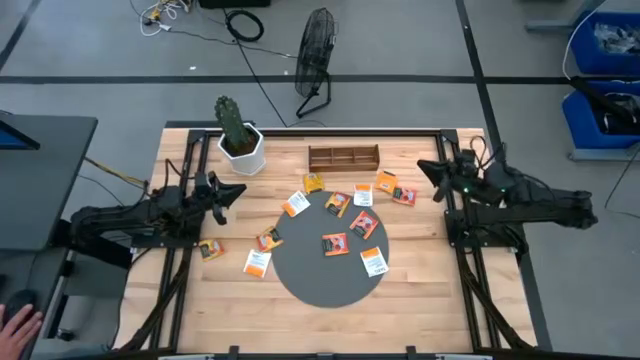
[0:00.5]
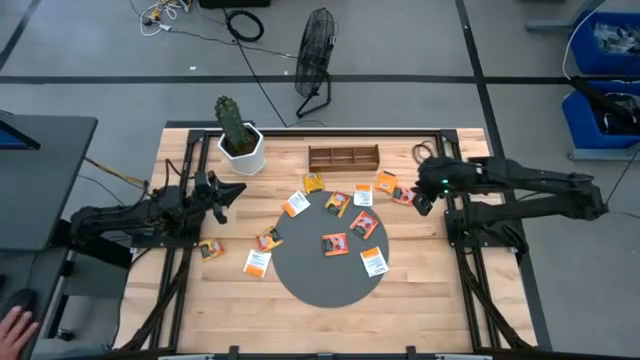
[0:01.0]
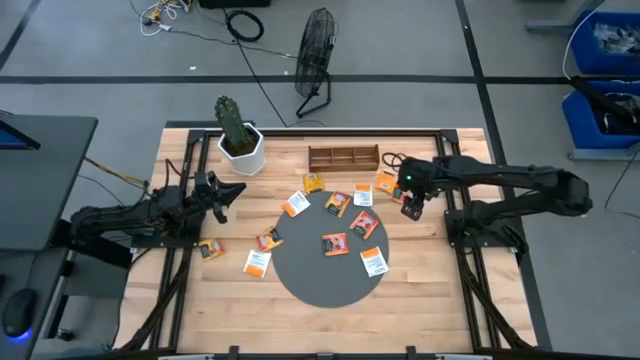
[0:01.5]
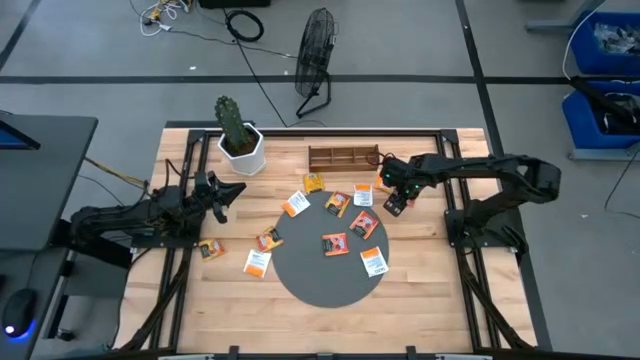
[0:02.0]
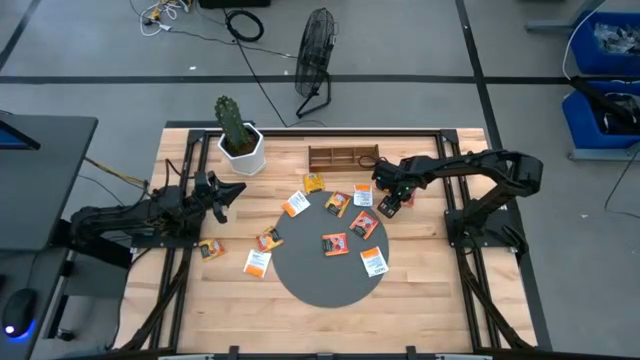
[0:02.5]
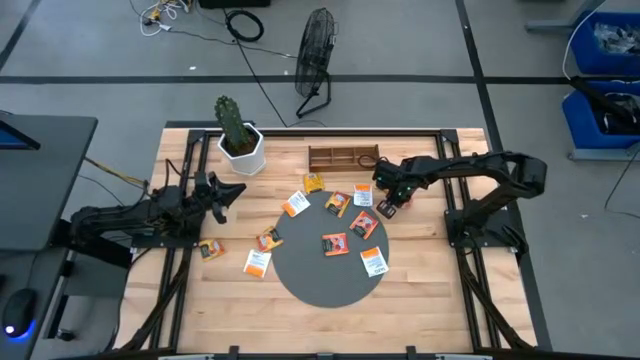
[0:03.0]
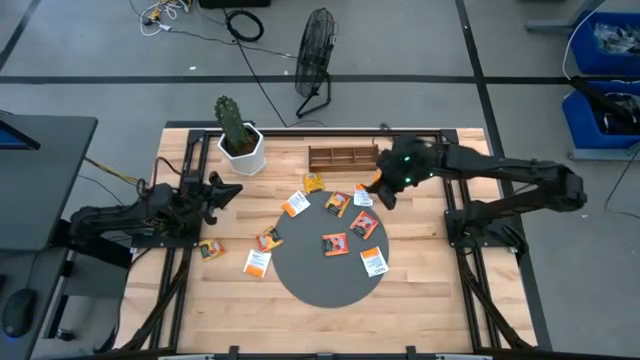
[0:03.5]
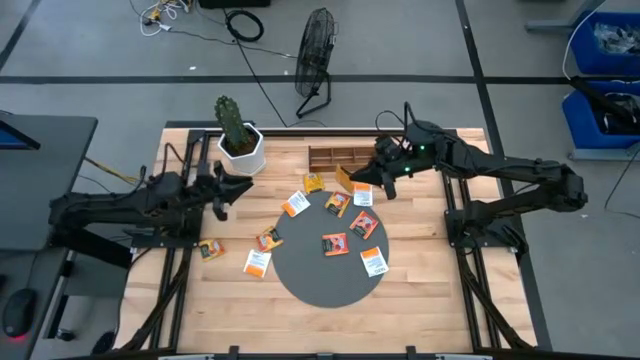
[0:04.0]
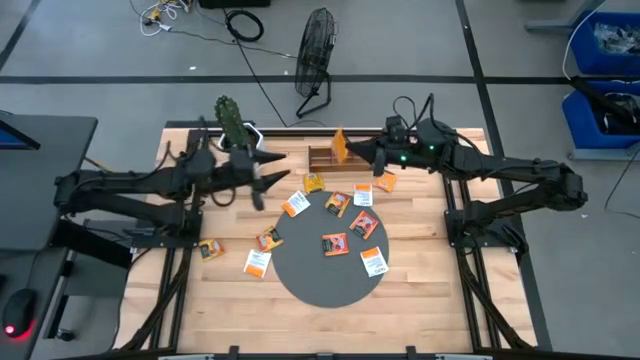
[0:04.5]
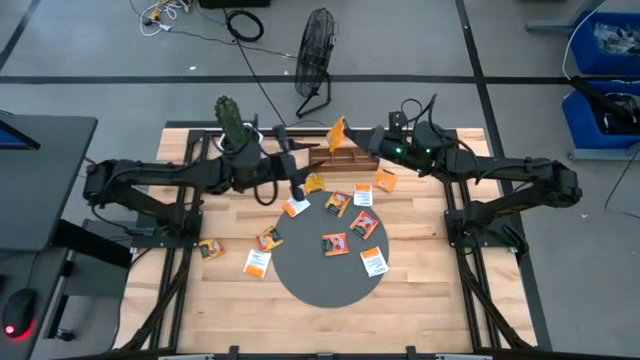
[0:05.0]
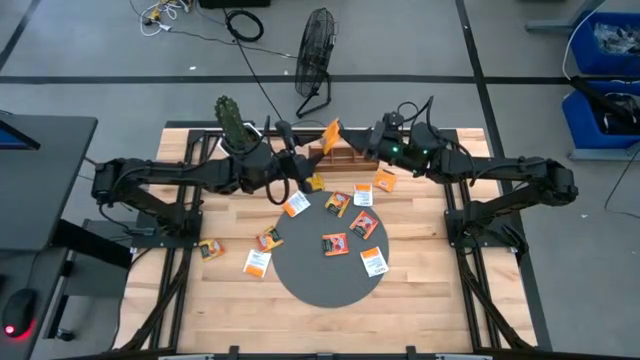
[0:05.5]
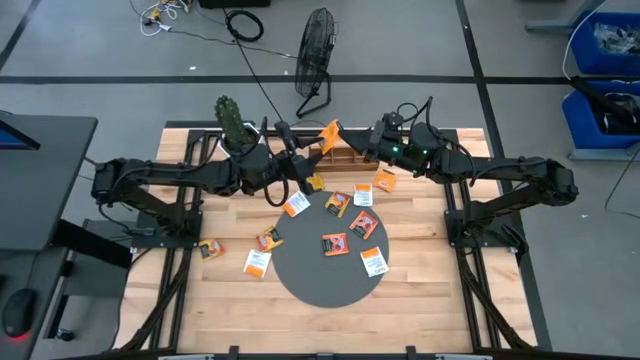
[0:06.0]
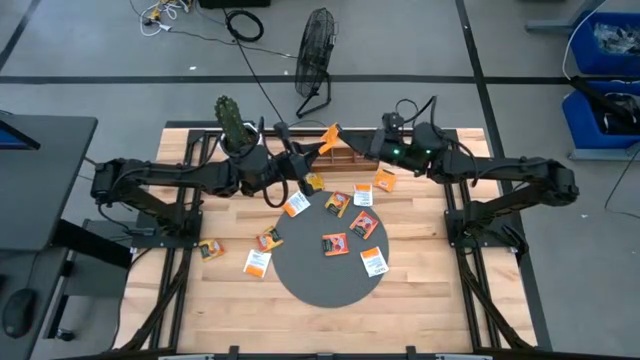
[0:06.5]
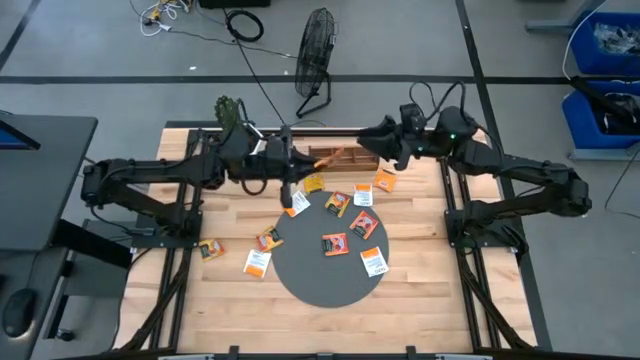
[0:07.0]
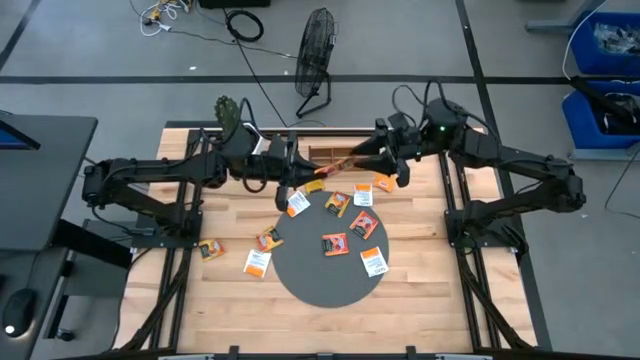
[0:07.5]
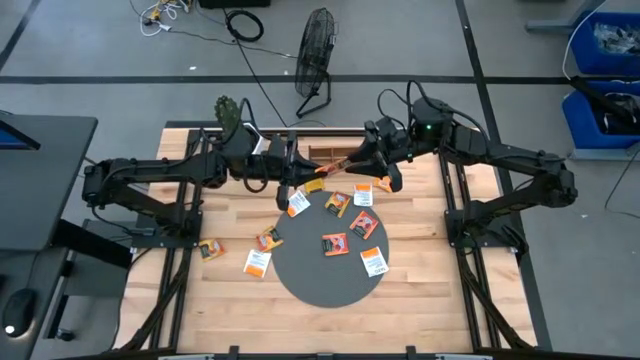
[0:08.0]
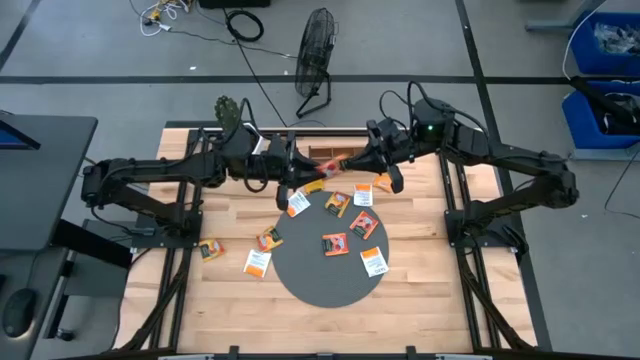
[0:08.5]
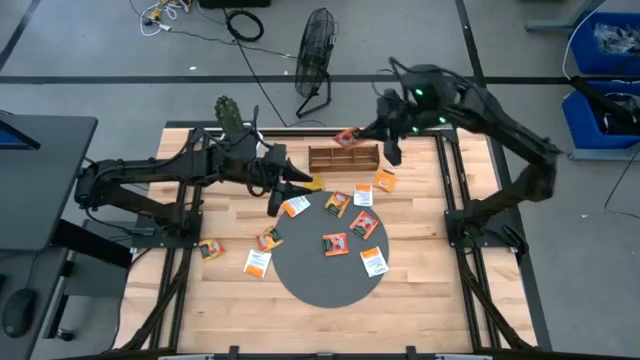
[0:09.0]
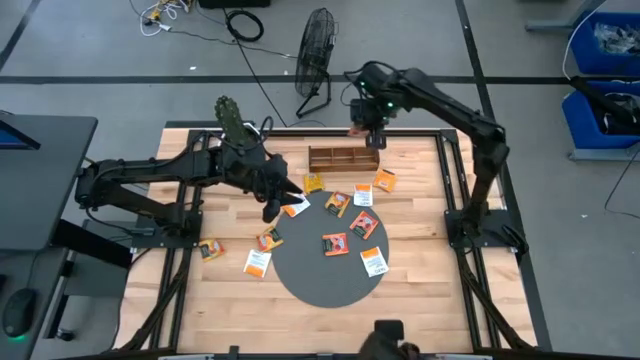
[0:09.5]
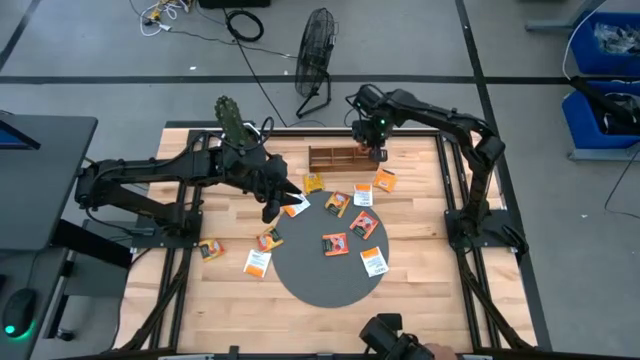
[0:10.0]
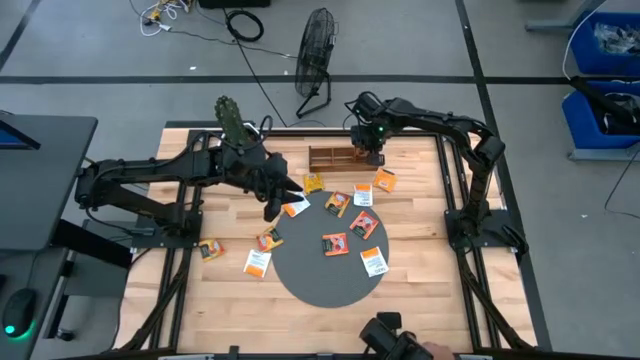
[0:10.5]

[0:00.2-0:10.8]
Task: Pick & Place Tea
Put the yellow tea bag into the right section of the wooden organizer

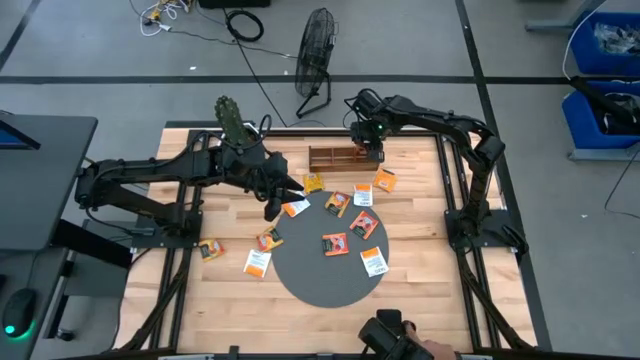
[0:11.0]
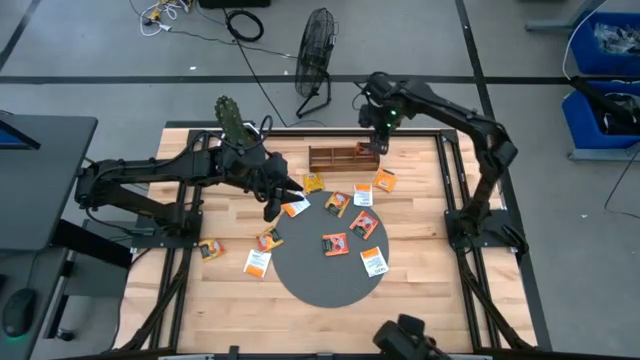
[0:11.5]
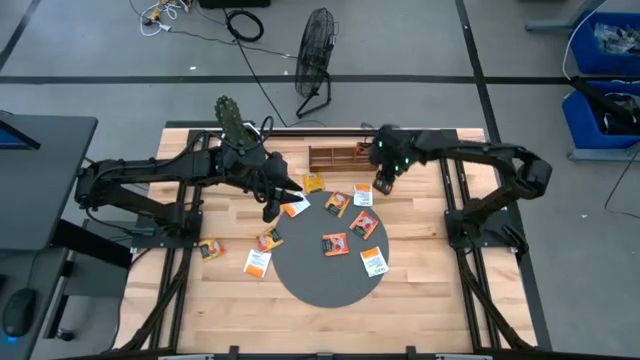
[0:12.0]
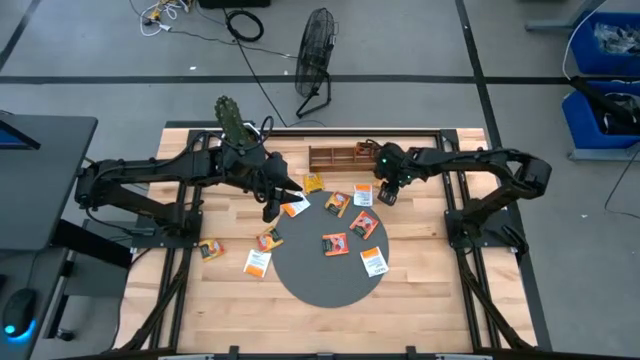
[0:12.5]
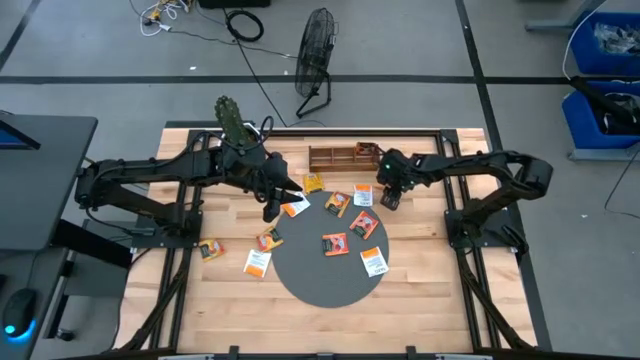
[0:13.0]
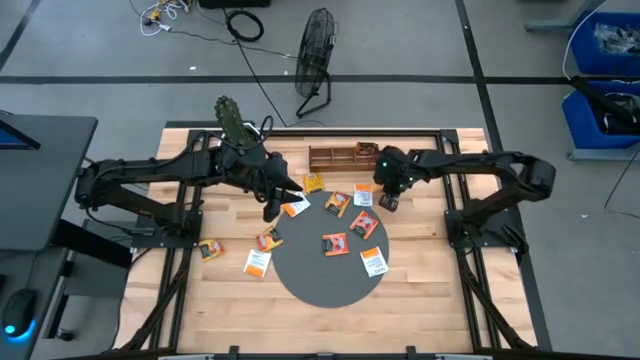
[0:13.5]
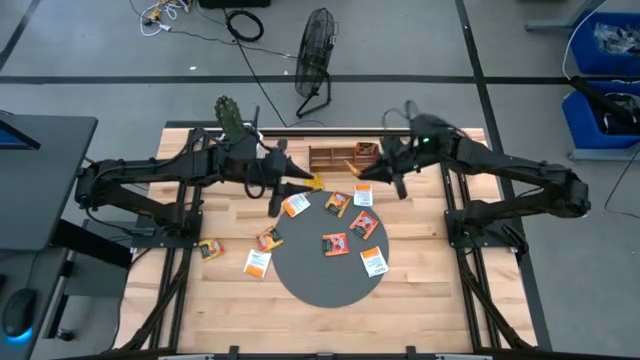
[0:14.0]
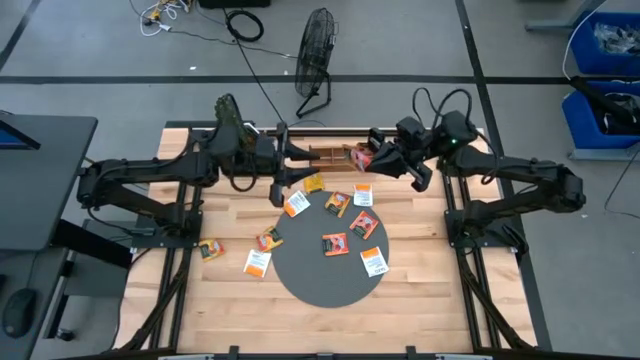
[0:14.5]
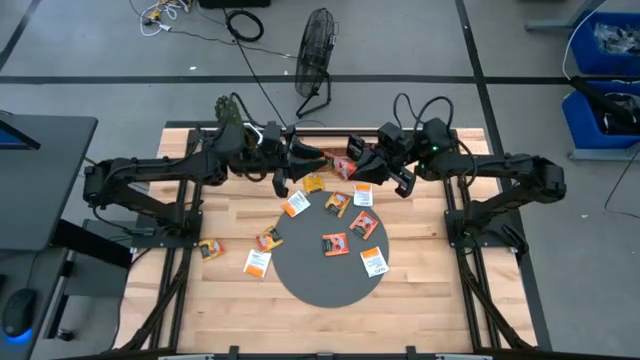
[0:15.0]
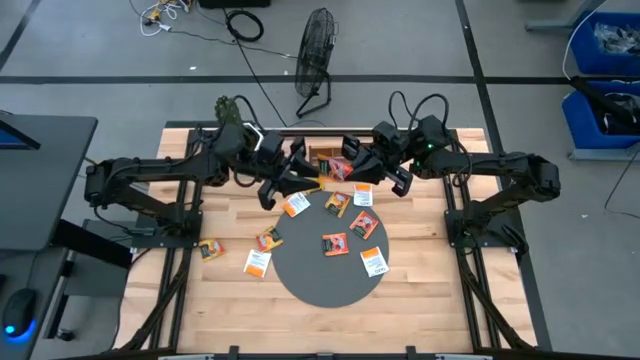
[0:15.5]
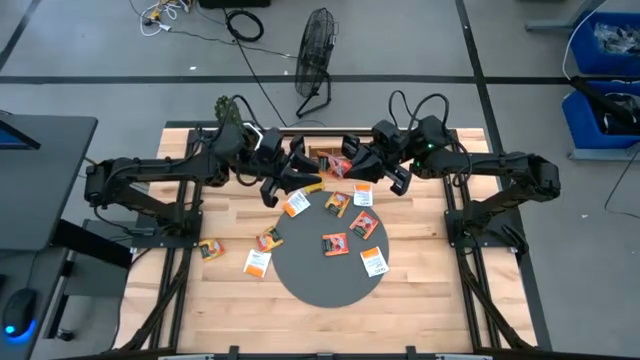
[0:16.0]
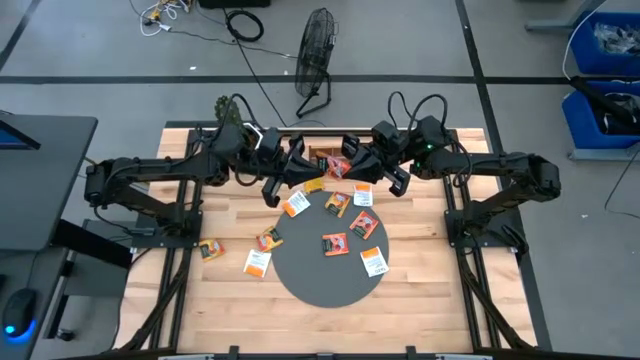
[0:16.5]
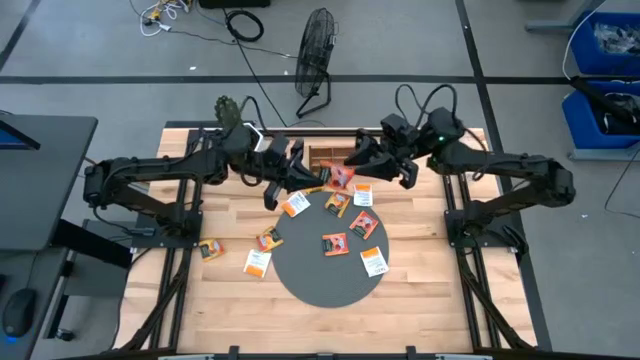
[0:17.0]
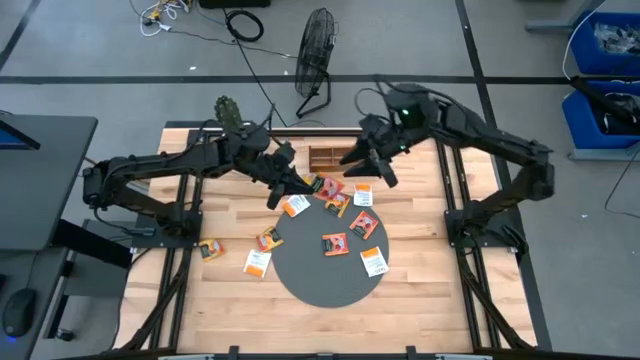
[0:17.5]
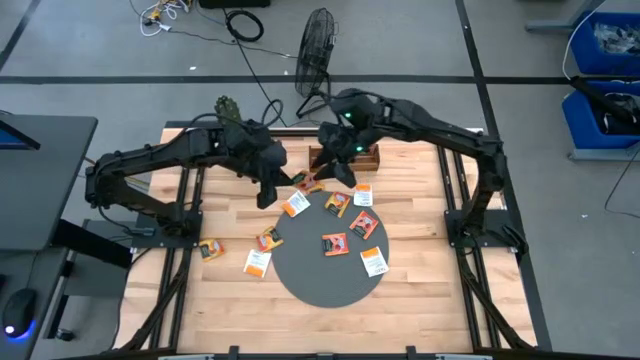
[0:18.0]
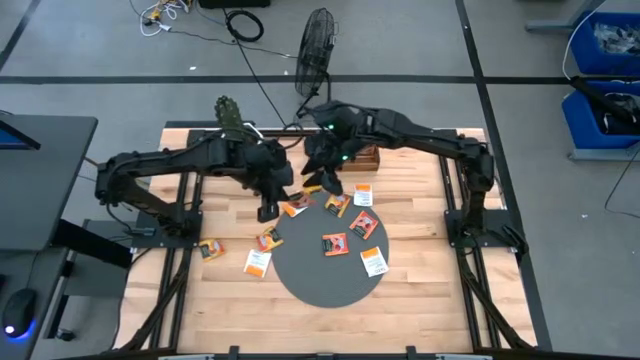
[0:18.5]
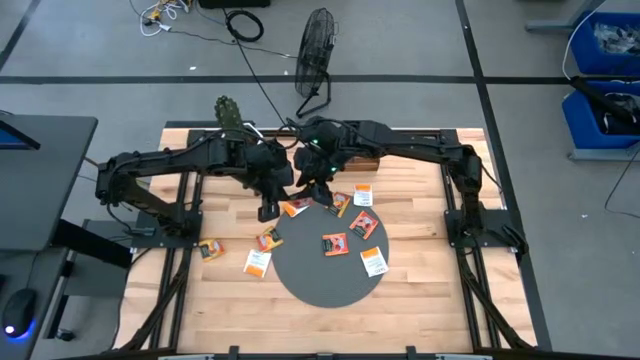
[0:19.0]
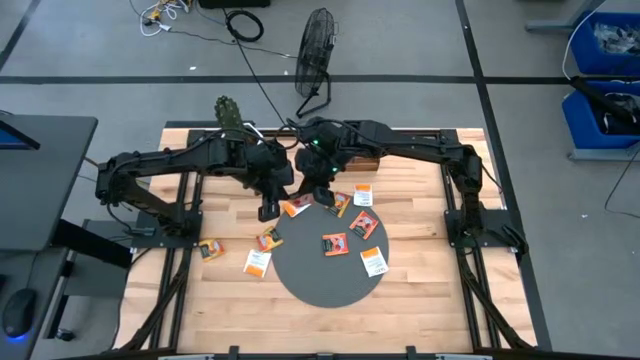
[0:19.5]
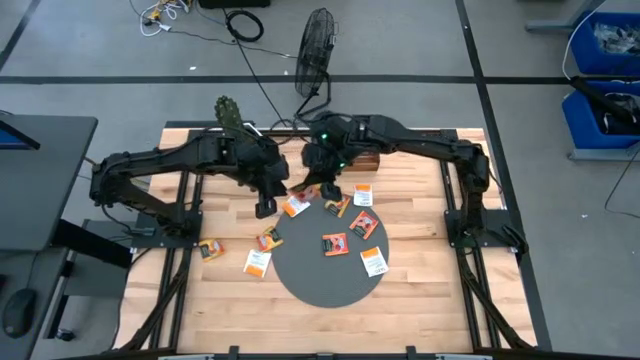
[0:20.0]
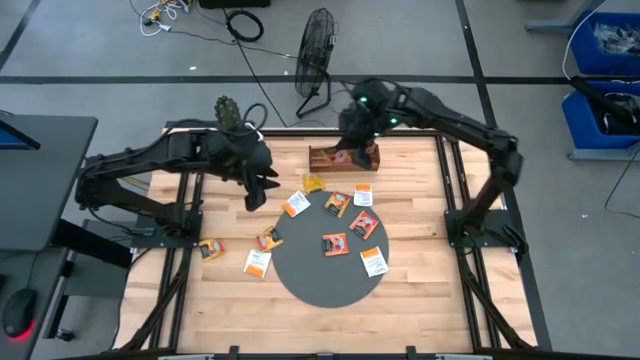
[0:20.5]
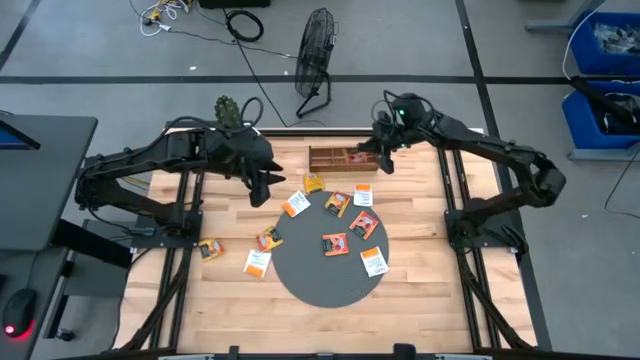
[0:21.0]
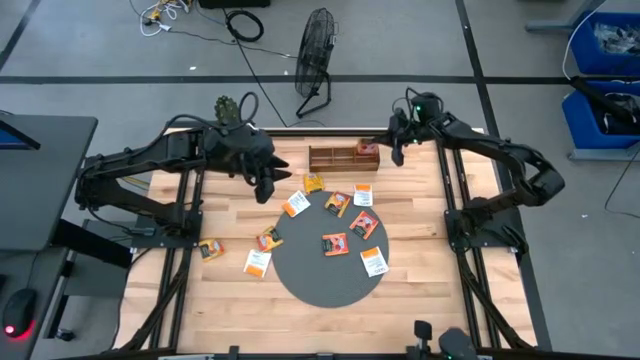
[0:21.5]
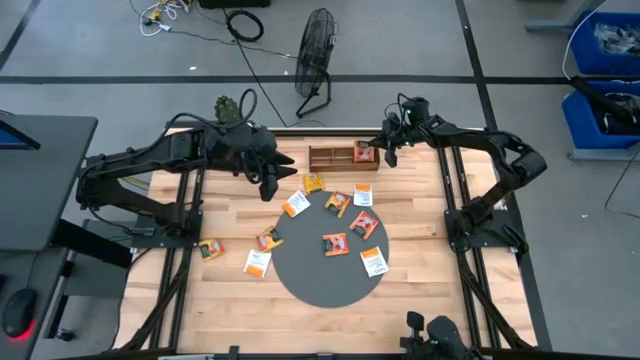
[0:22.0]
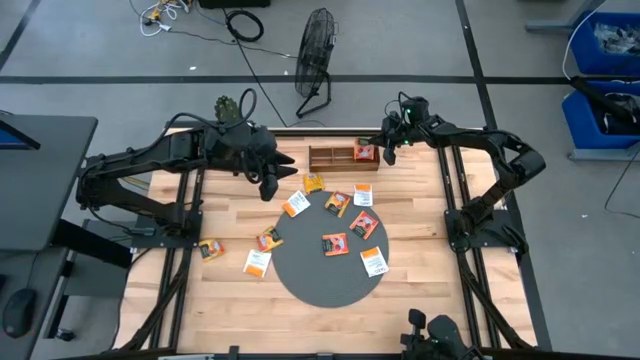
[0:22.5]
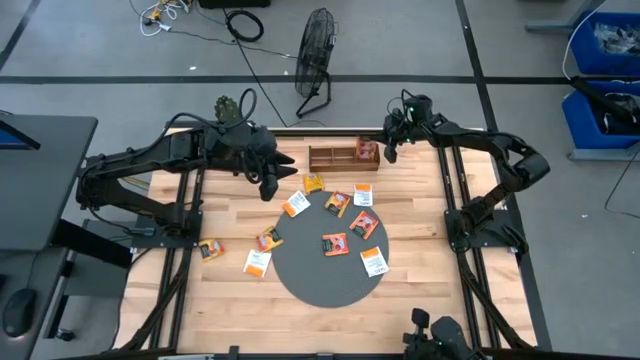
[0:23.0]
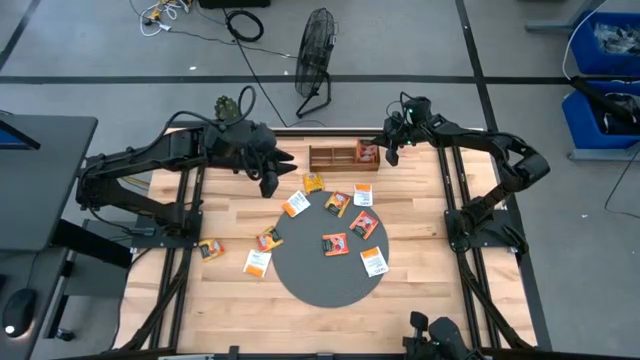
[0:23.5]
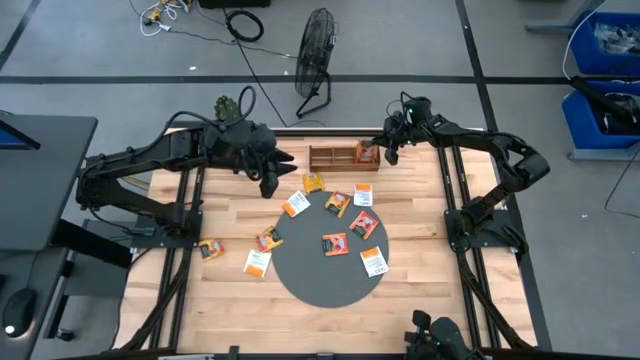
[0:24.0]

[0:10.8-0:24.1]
Put the yellow tea bag into the right section of the wooden organizer
